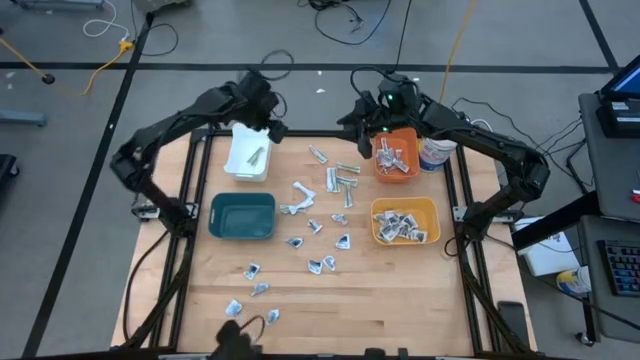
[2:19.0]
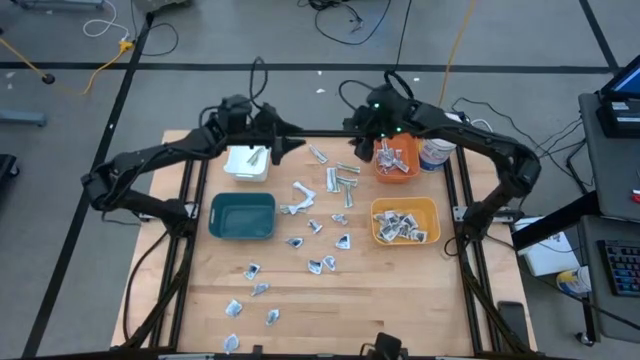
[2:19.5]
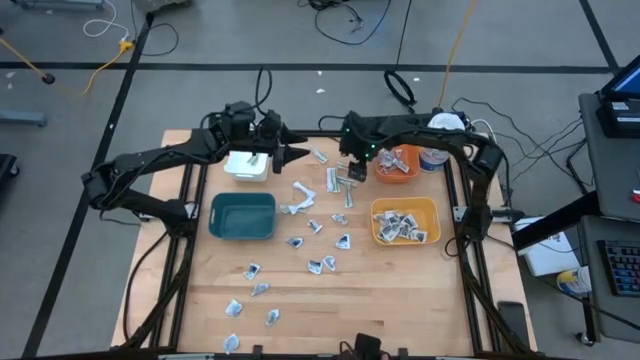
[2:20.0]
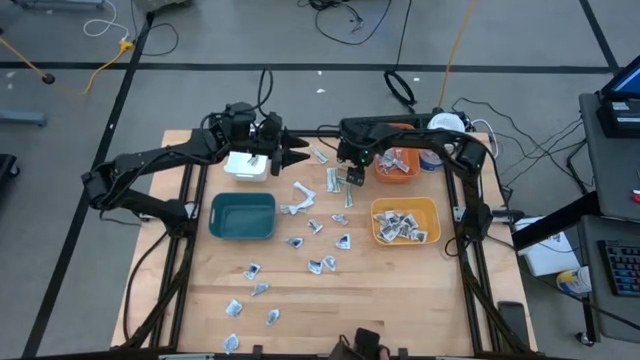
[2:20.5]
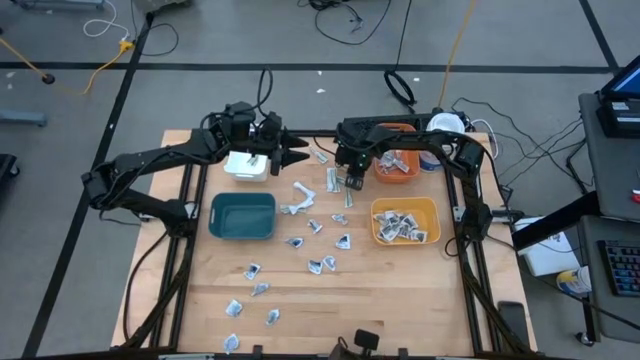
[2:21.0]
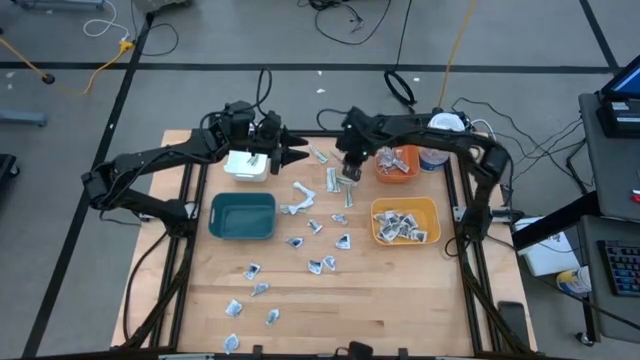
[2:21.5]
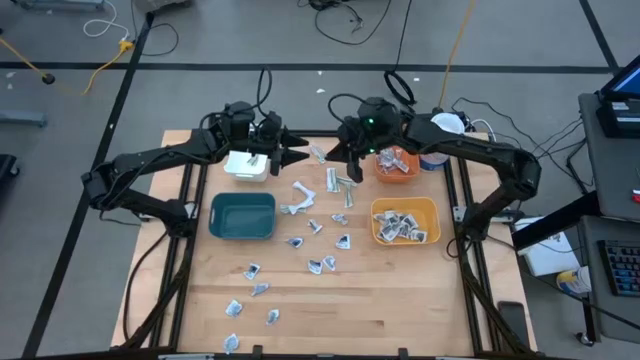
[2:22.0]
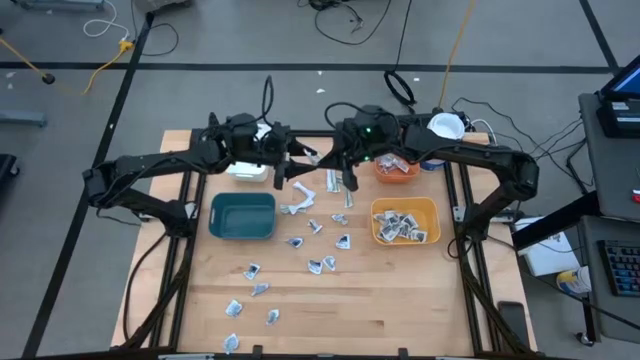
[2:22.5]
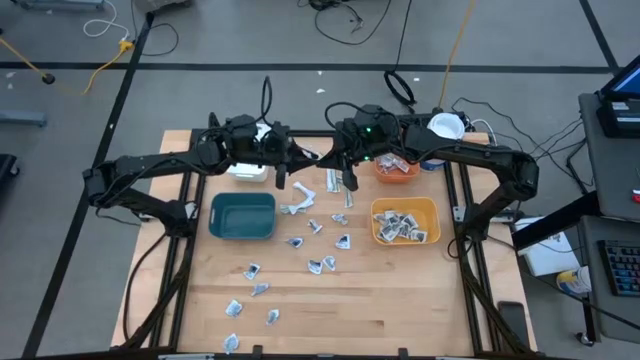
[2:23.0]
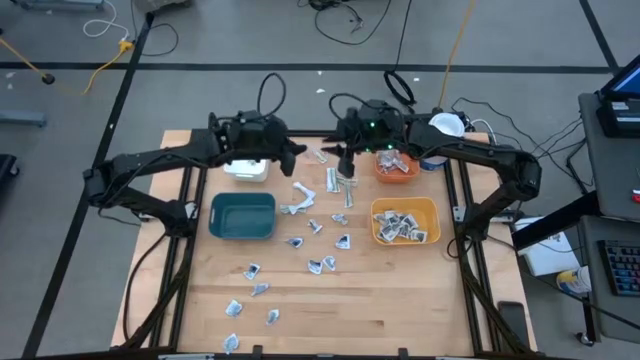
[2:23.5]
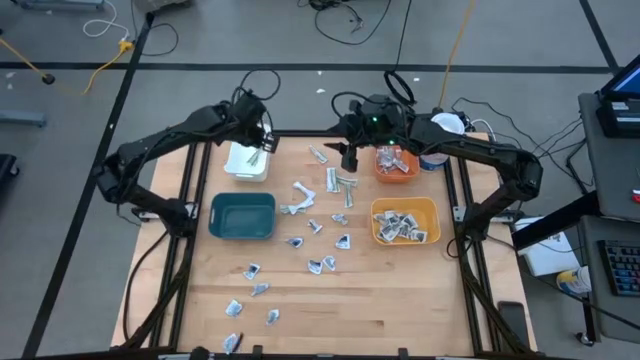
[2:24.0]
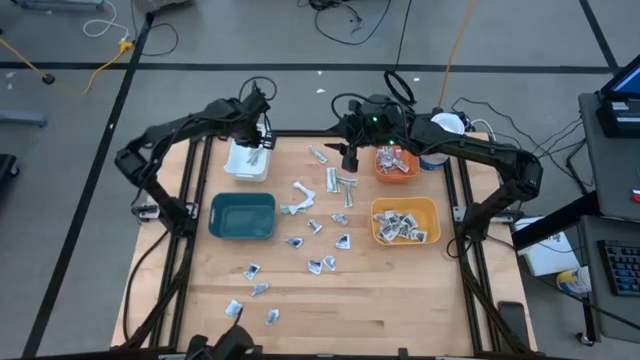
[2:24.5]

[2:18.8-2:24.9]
Task: Pick & Place First Aid Supplies
Put the bandage into the white bin

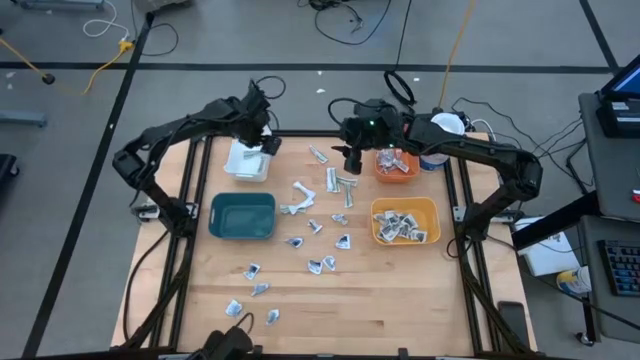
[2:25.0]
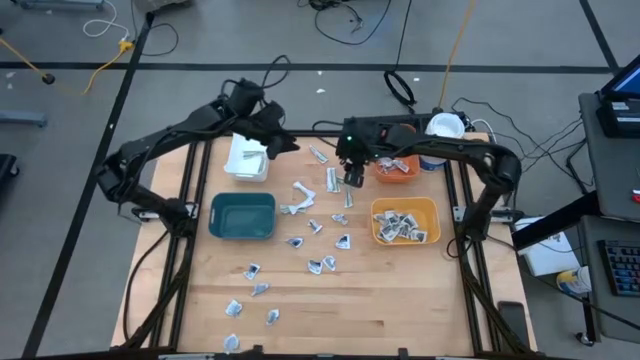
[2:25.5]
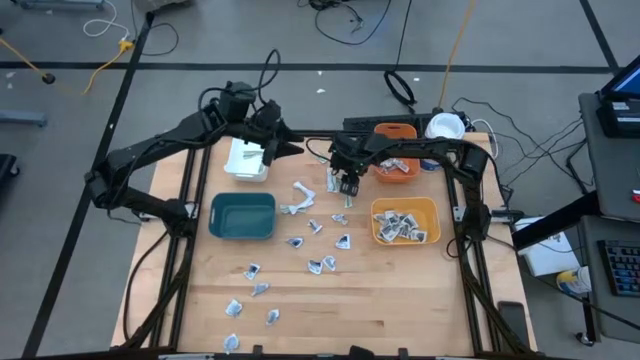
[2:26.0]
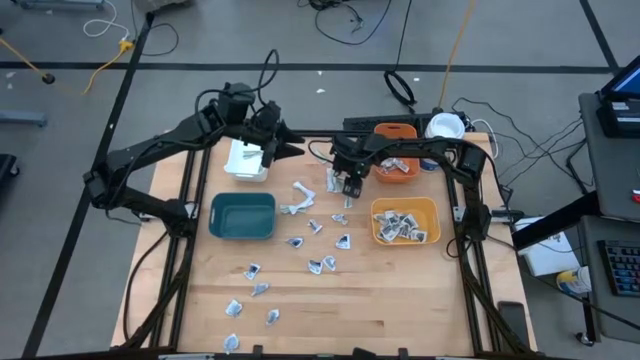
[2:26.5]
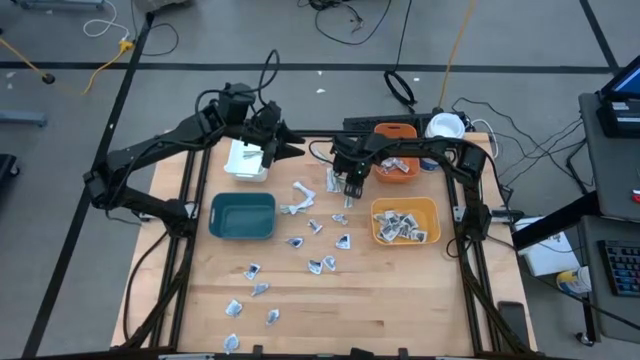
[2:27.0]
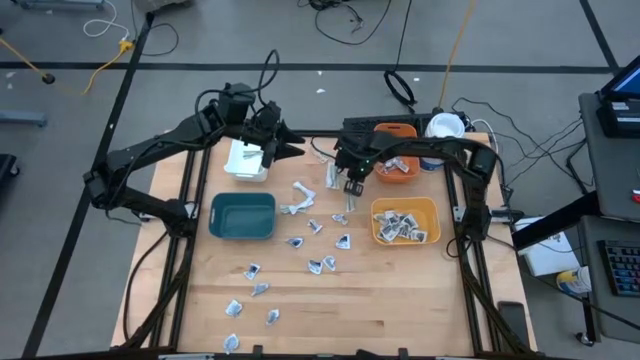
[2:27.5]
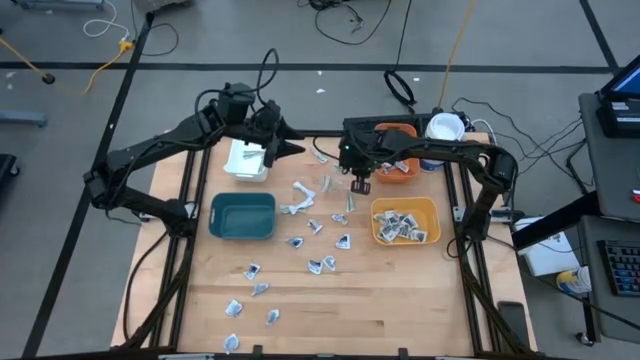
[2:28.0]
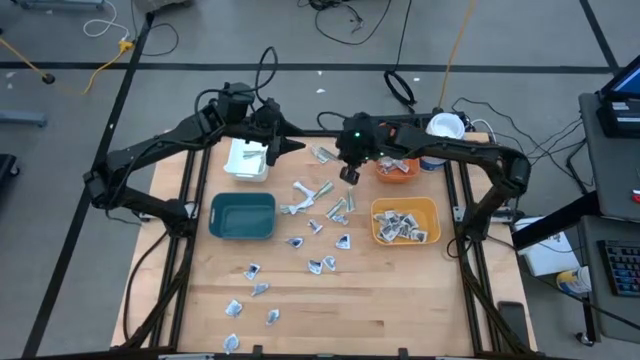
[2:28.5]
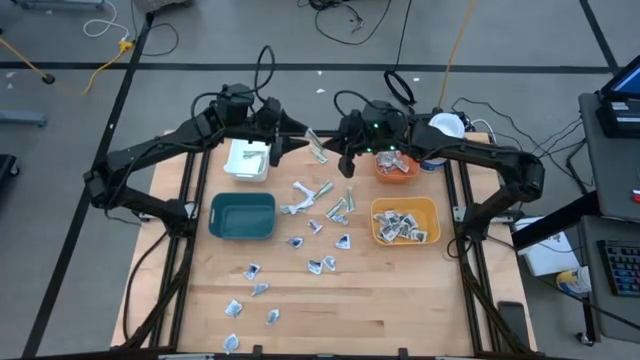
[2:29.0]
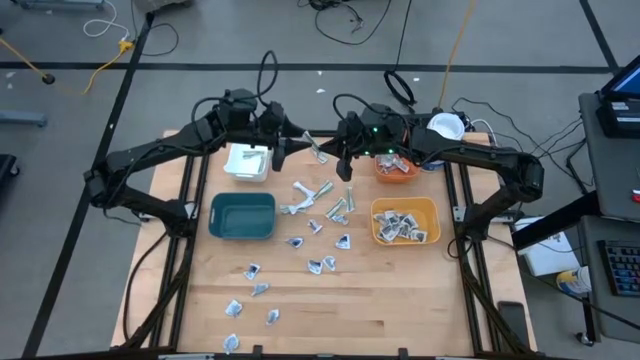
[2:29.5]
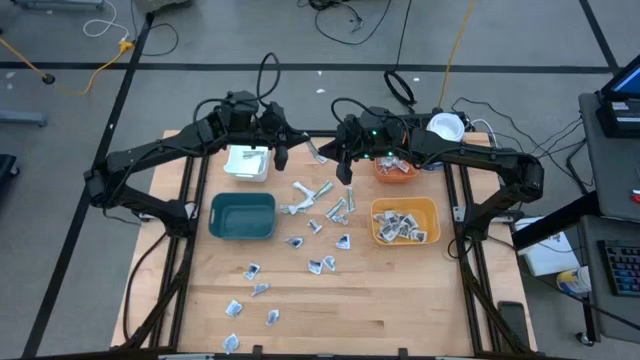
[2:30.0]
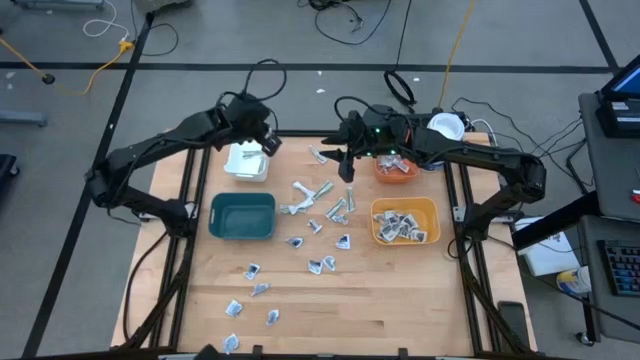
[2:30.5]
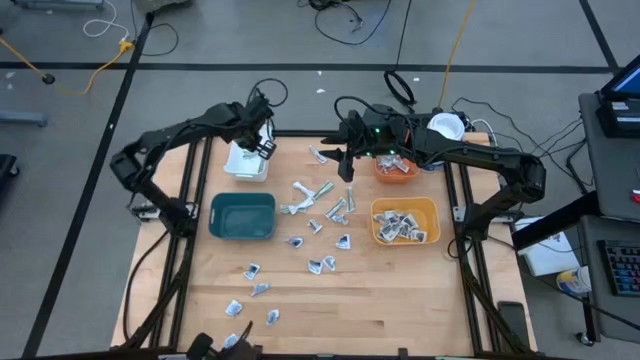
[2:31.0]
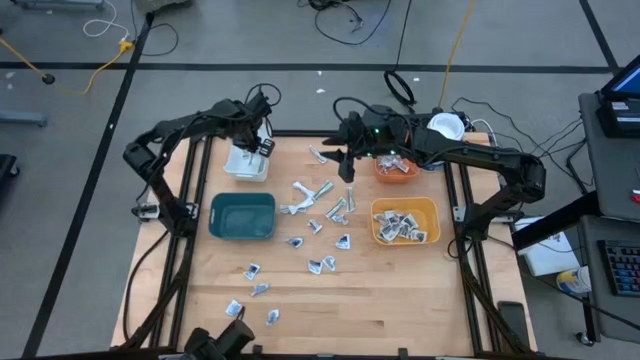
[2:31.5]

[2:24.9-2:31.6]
Put the bandage into the white bin

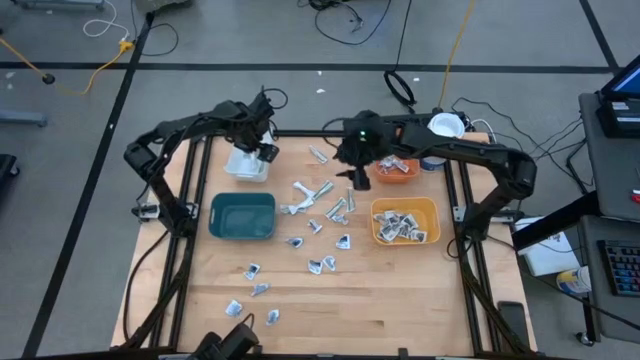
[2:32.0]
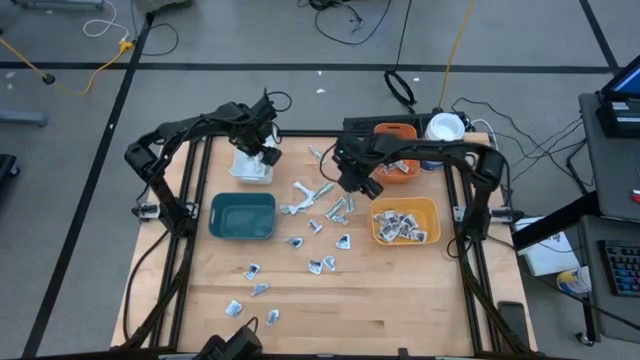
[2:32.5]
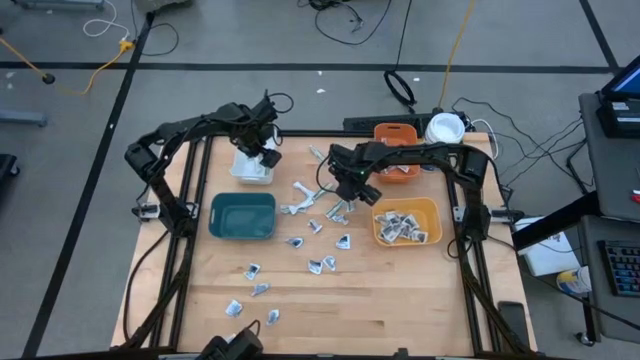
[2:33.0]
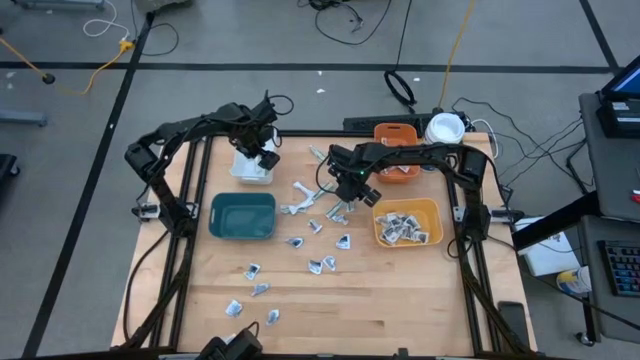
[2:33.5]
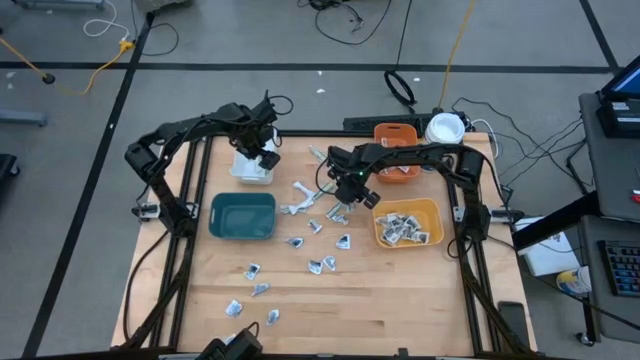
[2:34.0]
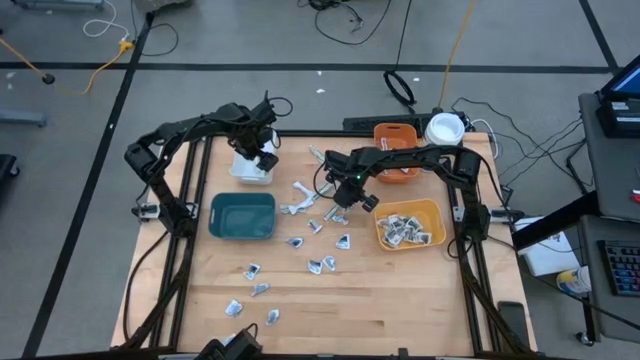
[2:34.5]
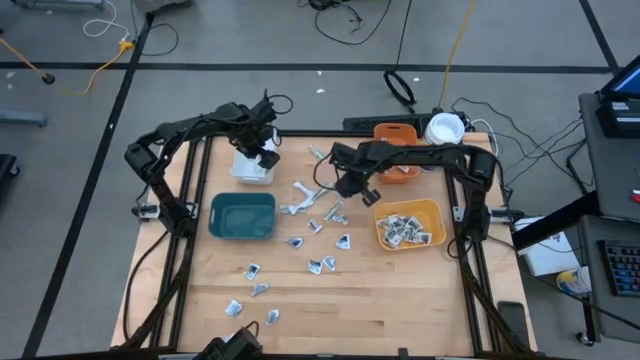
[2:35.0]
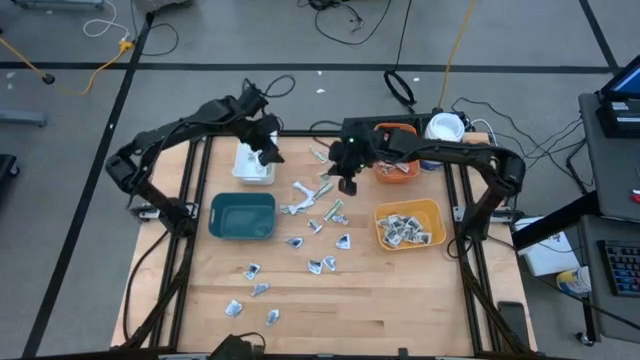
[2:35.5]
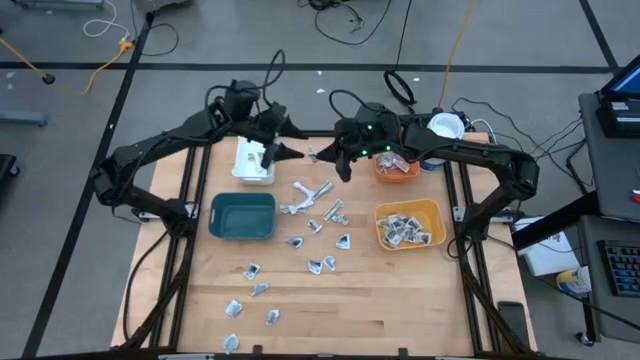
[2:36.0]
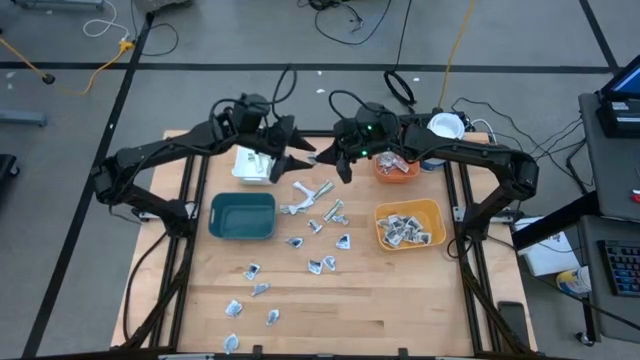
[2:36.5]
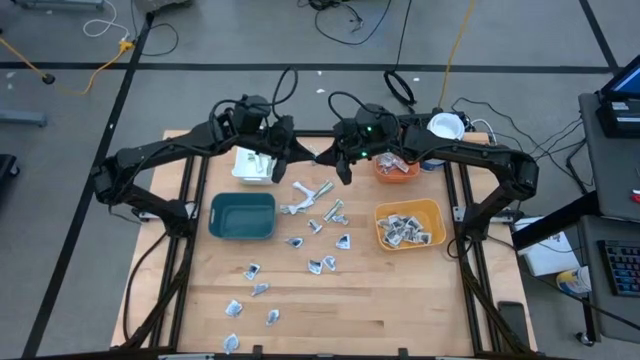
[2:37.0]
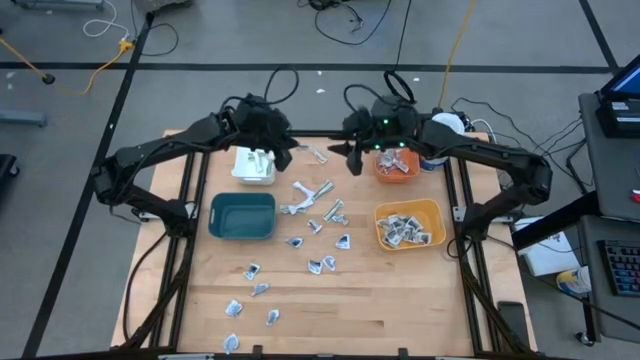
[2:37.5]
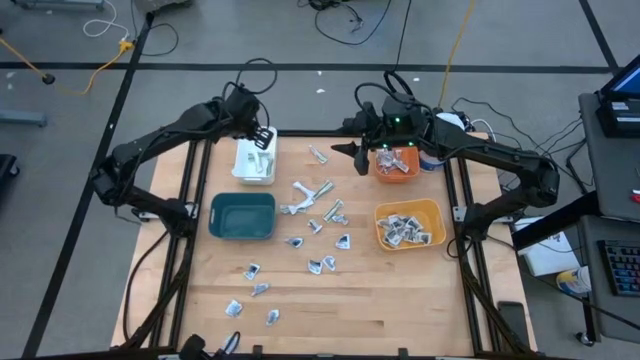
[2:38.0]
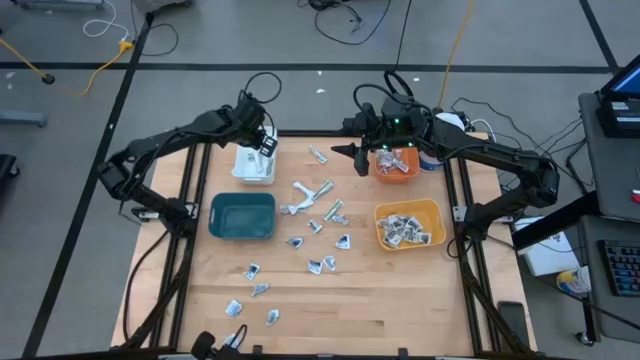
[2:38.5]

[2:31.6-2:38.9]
Put the bandage into the white bin
